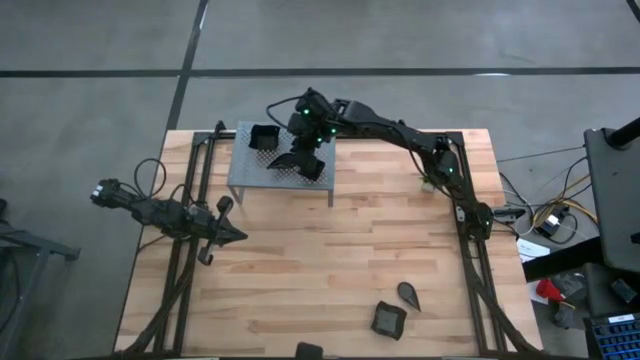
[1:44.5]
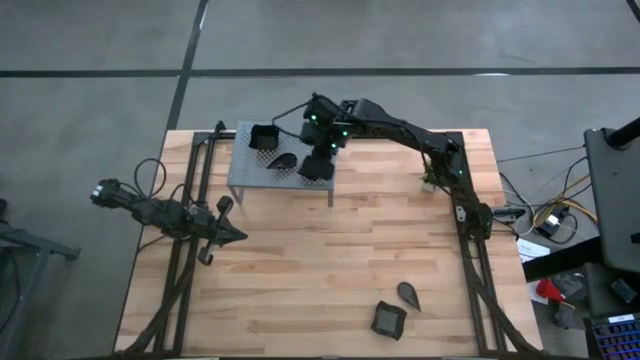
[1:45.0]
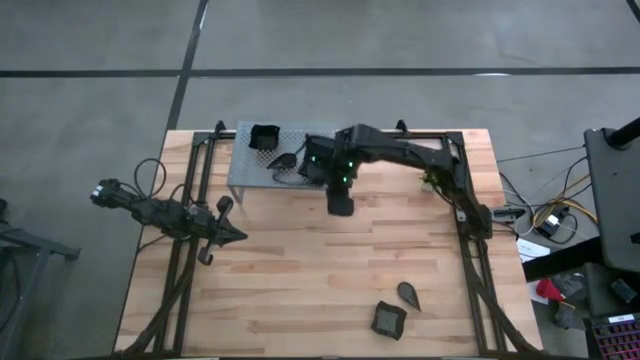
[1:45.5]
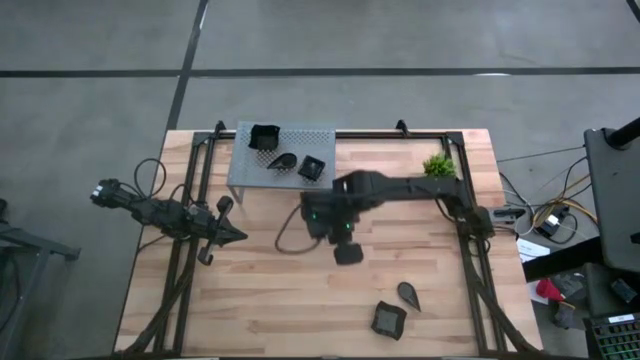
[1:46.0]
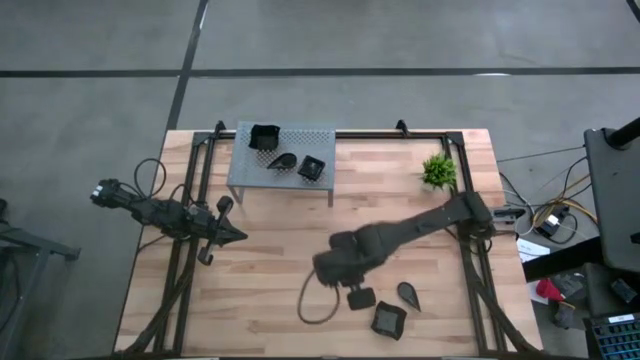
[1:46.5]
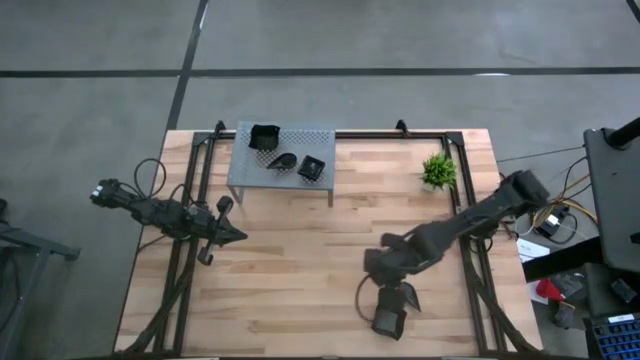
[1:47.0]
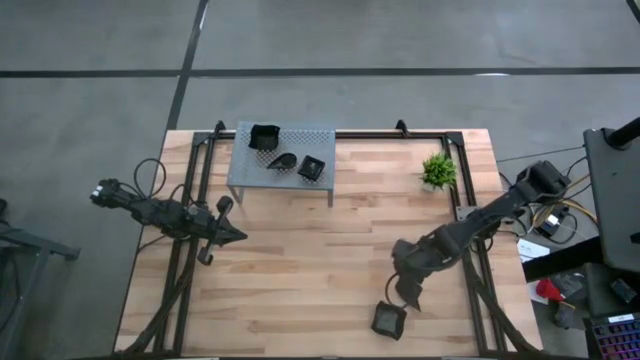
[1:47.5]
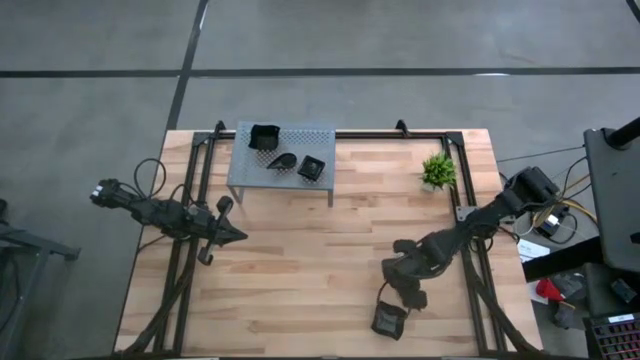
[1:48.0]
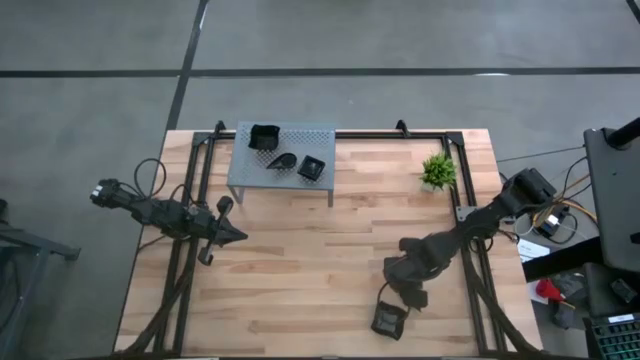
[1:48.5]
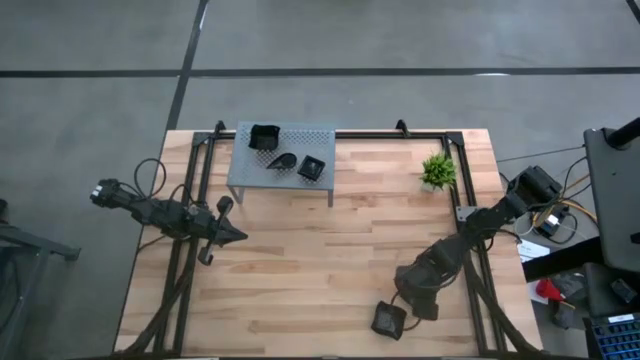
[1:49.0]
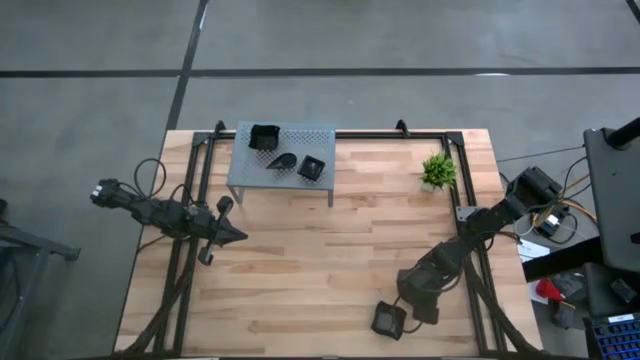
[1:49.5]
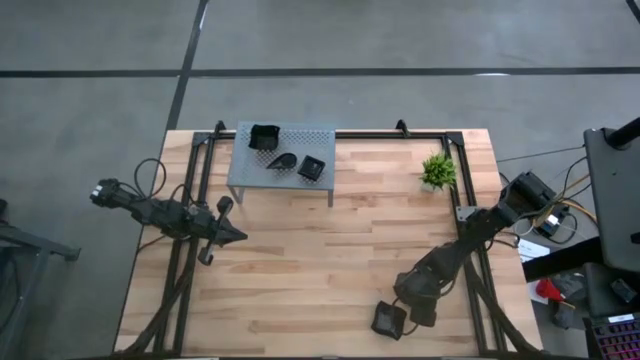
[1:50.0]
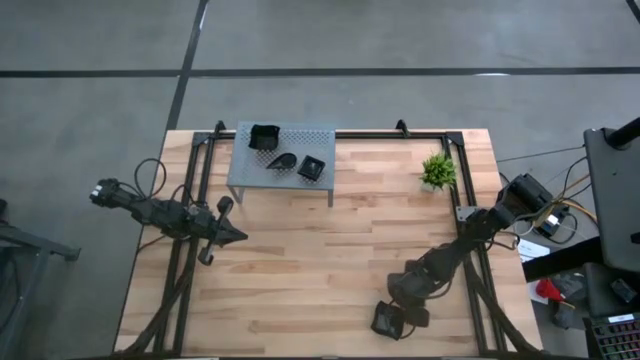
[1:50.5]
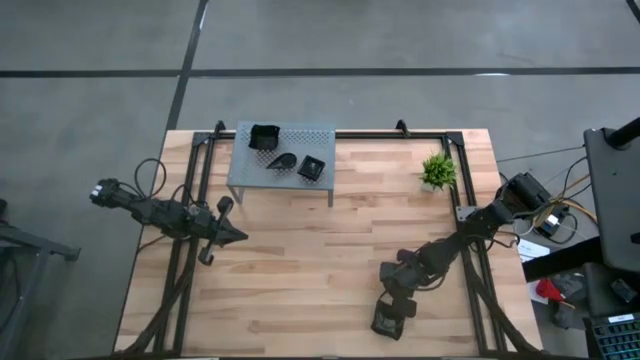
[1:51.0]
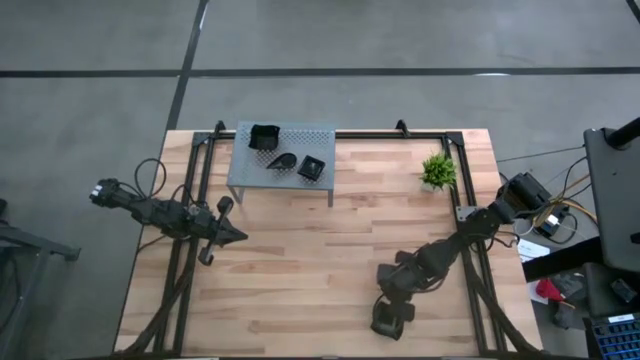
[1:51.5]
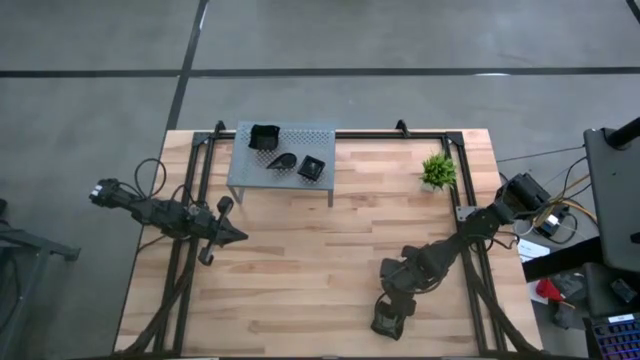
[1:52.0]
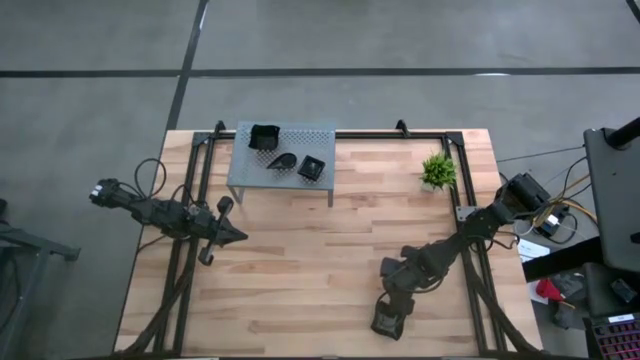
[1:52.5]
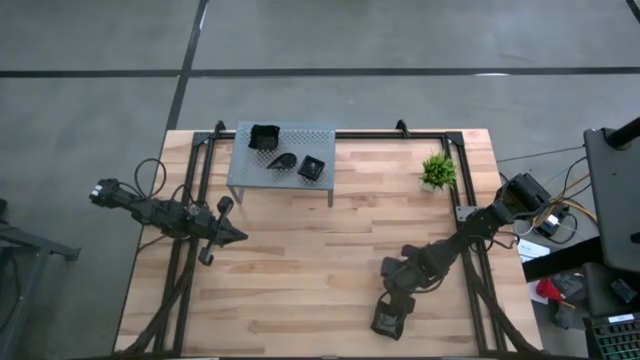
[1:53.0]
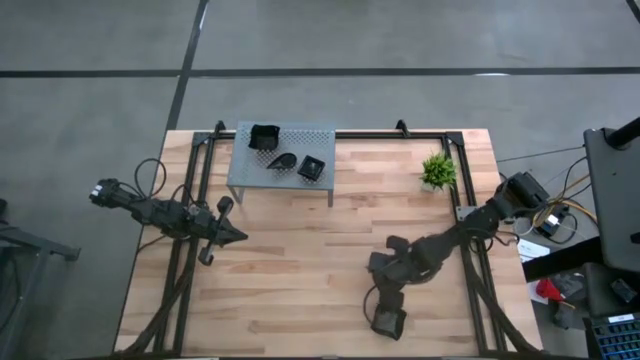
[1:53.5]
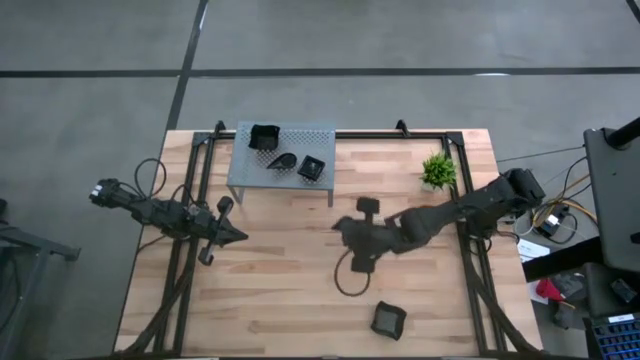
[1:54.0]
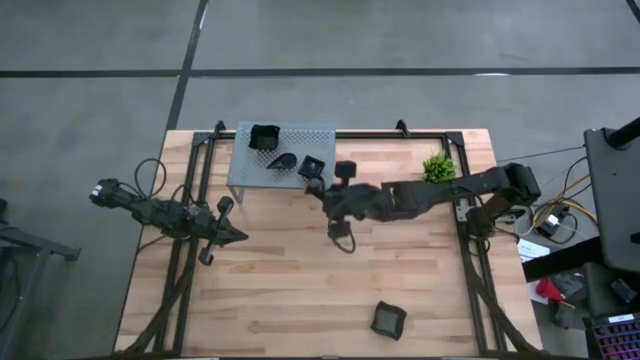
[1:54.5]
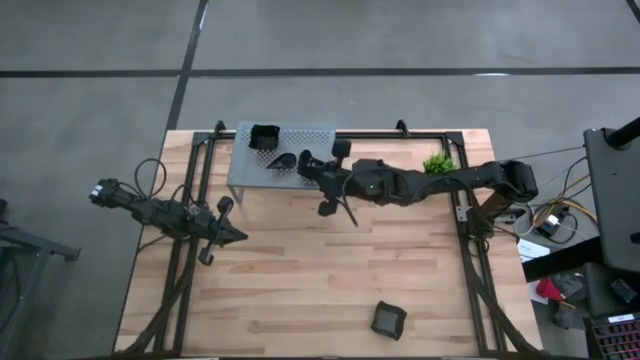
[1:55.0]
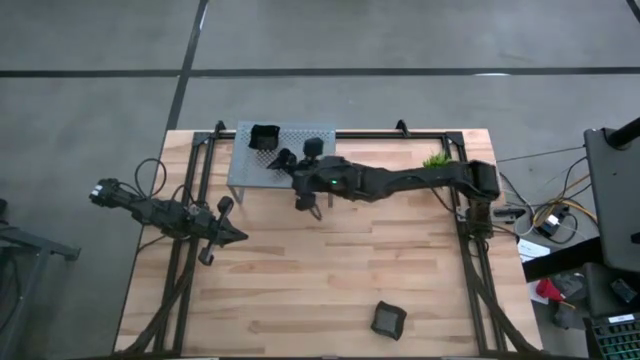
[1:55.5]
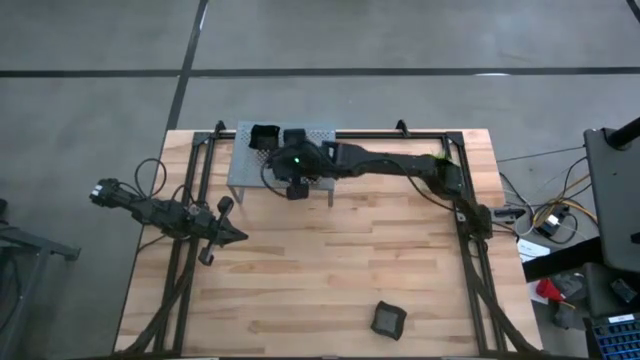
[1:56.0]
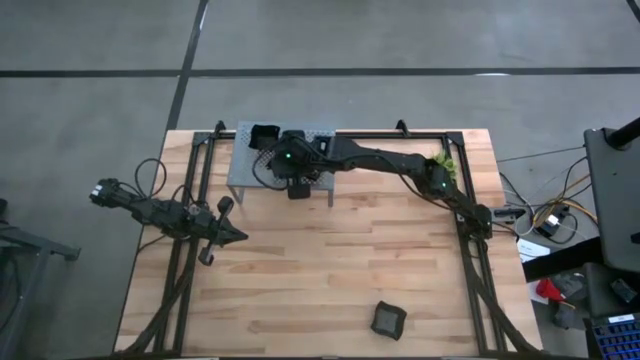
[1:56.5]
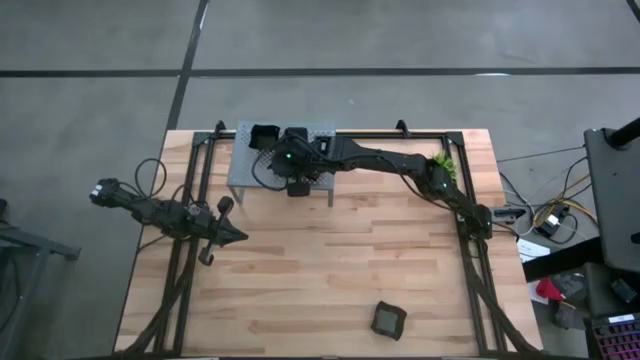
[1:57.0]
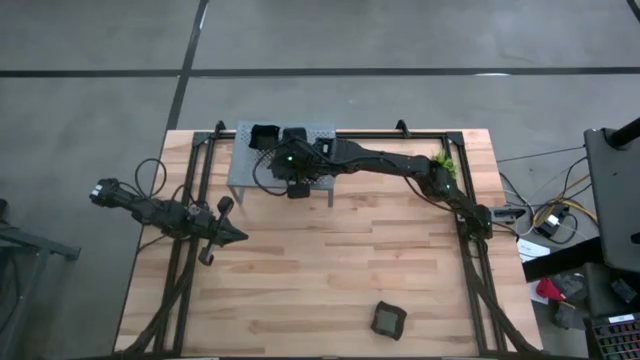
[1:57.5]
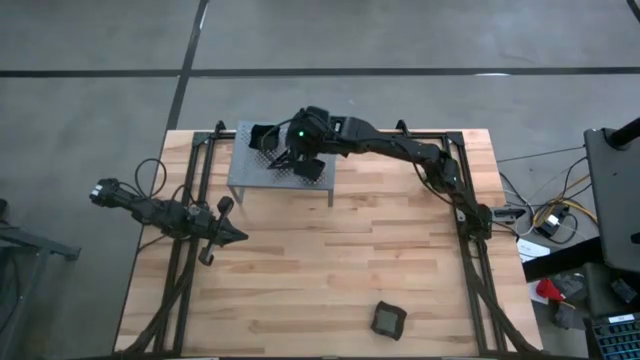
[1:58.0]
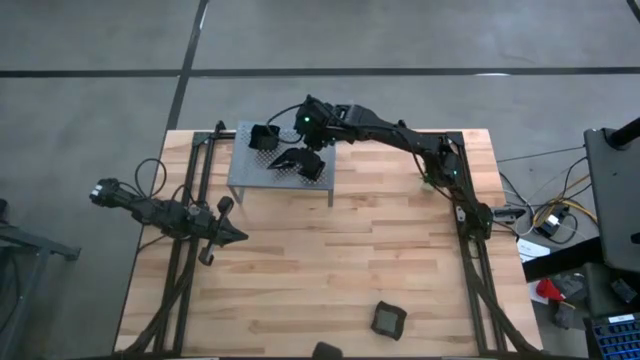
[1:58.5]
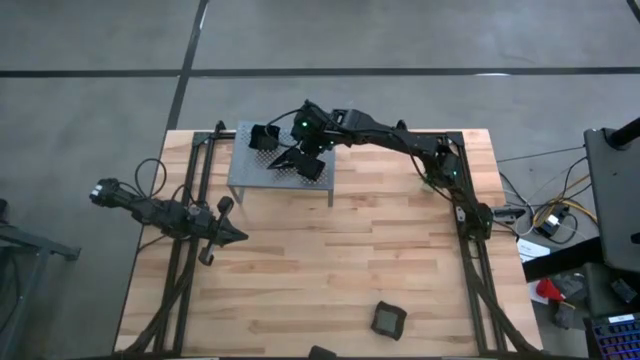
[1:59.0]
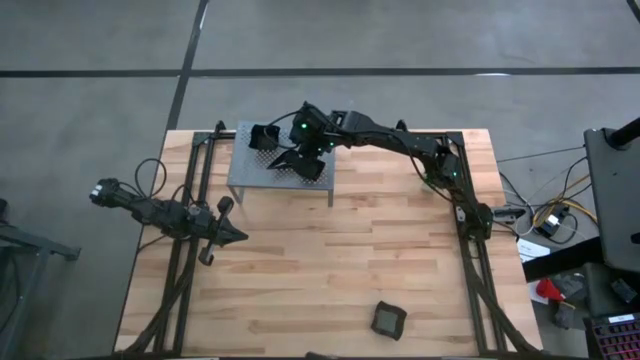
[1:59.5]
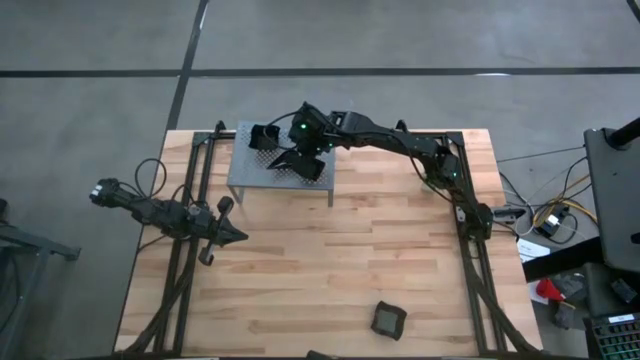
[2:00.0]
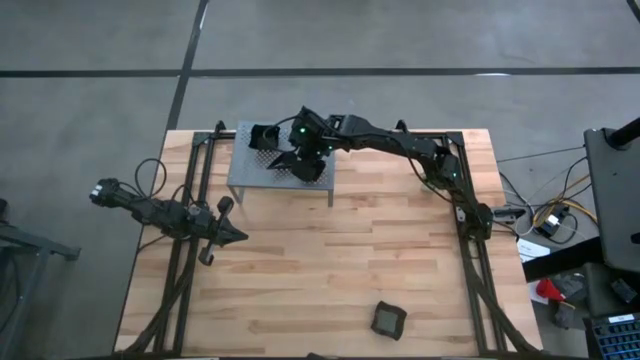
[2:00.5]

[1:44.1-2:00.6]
Task: Pick & Place Mini shaped plates
Stack the black leaf-shaped plate on top of the black leaf-shaped plate on the shelf

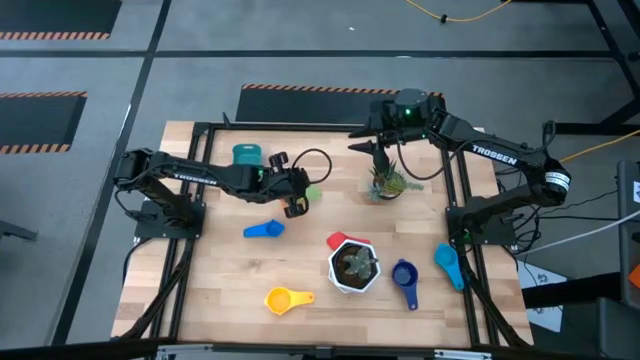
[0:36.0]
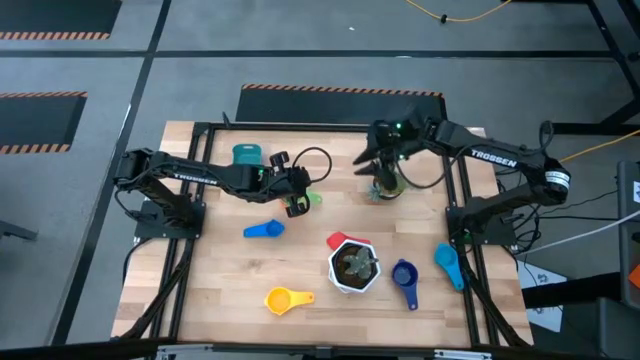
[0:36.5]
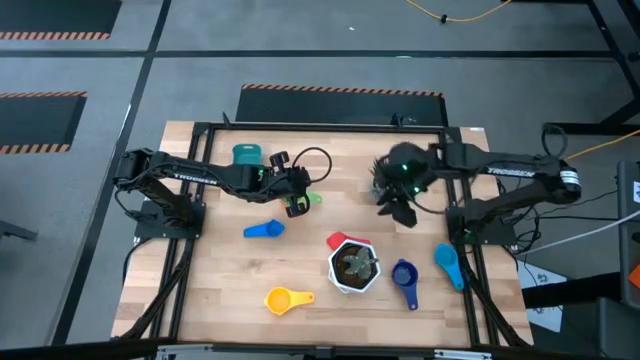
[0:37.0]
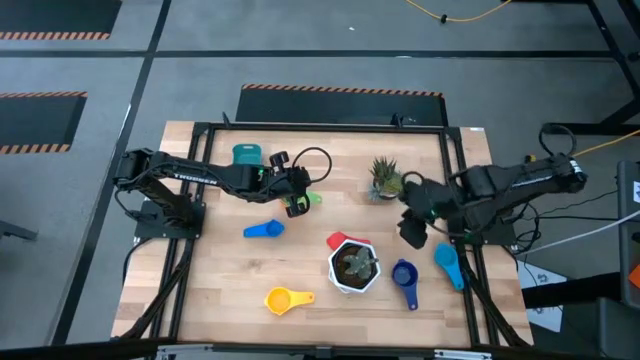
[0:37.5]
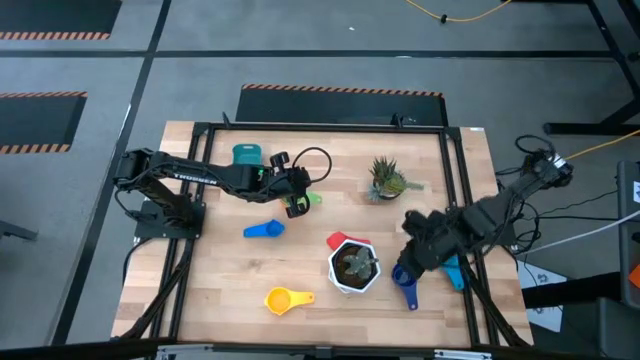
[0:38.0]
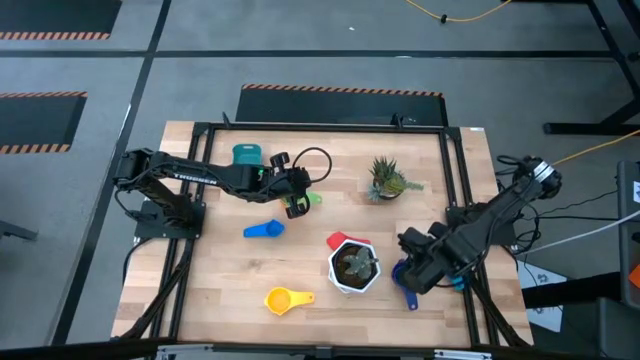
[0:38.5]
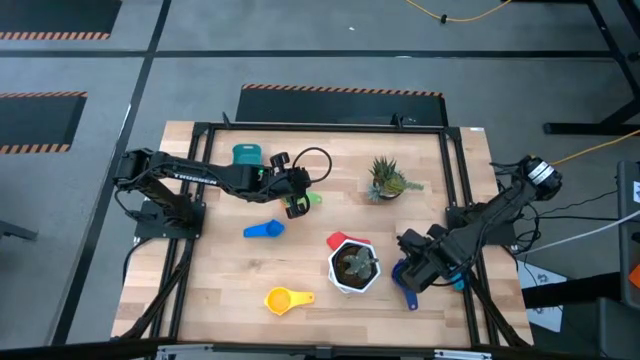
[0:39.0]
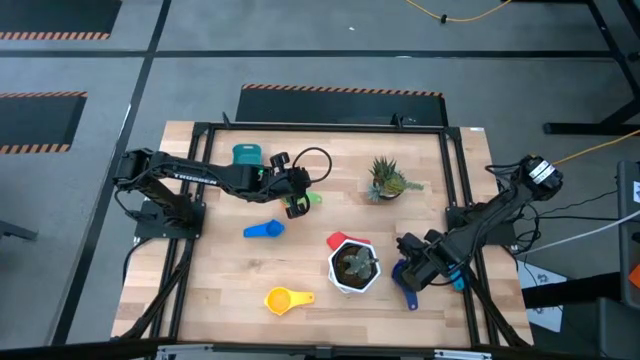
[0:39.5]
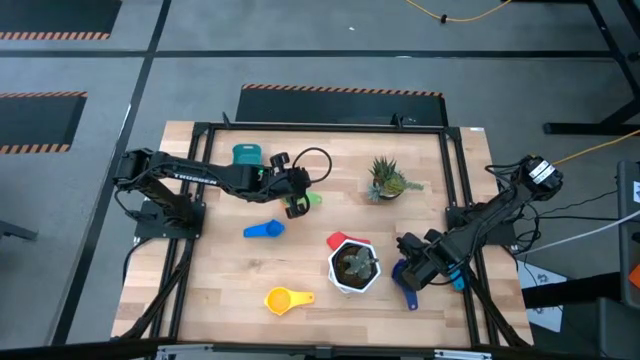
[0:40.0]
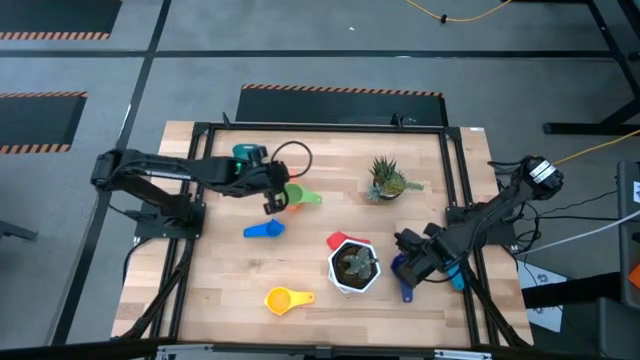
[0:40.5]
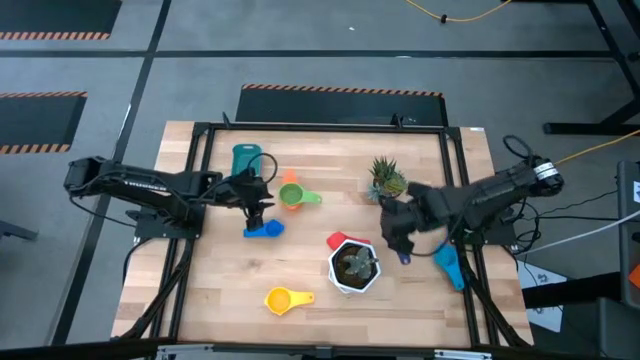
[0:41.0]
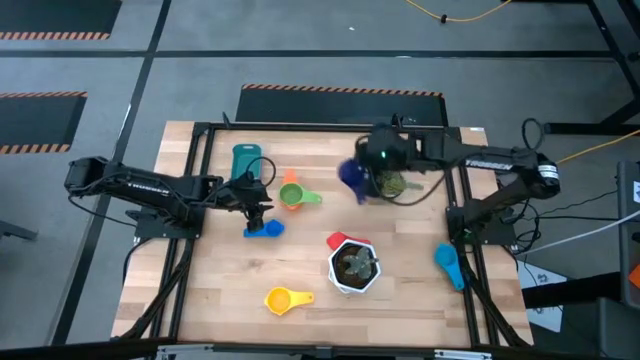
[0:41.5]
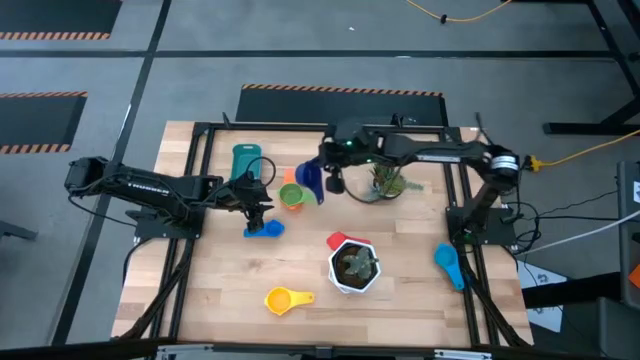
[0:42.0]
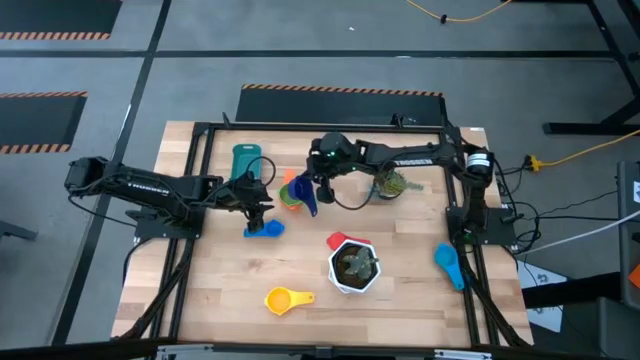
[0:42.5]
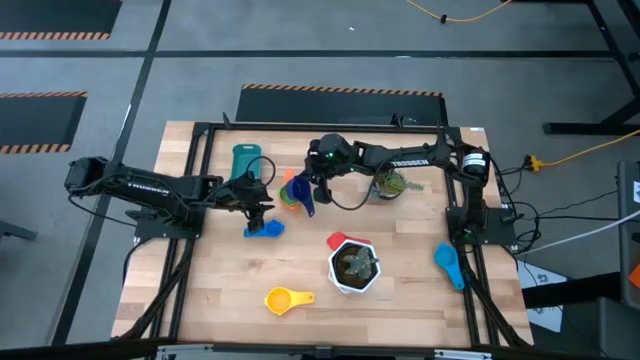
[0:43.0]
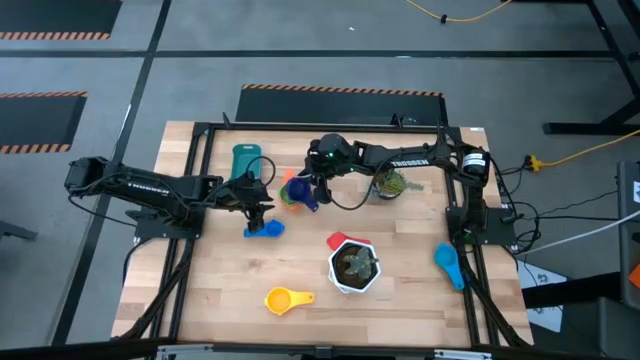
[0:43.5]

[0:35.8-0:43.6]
Task: Nest measuring cups in basket
Stack the dark blue measuring cup into the green measuring cup
